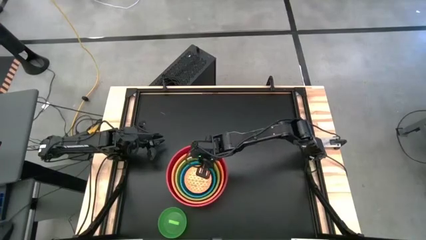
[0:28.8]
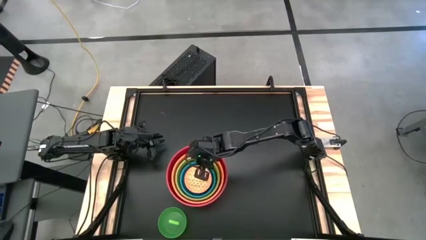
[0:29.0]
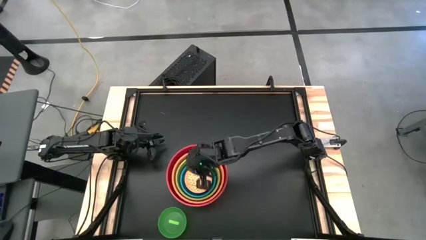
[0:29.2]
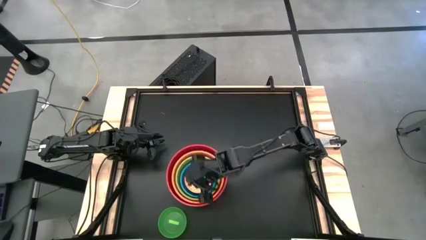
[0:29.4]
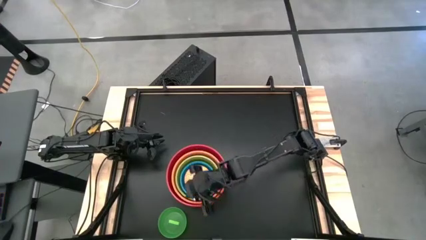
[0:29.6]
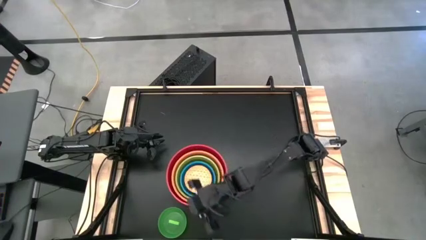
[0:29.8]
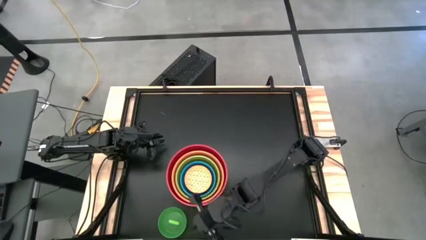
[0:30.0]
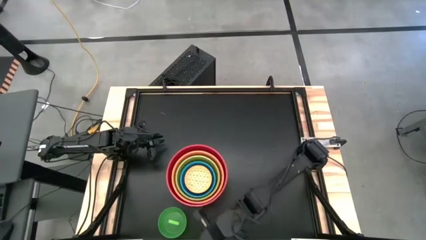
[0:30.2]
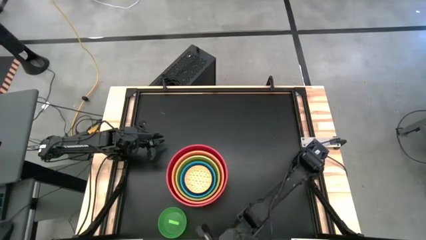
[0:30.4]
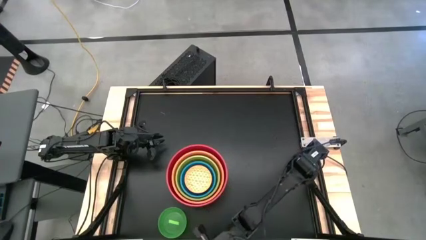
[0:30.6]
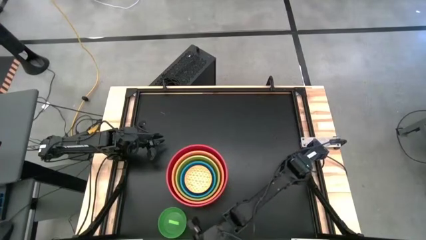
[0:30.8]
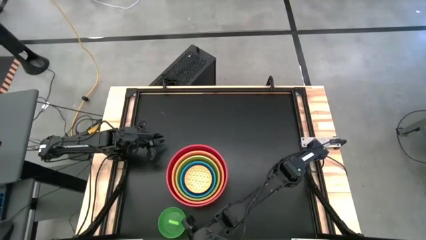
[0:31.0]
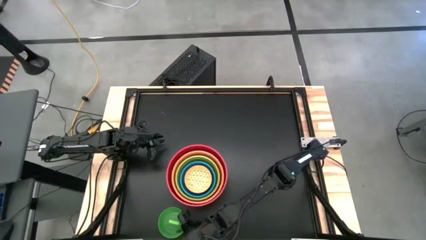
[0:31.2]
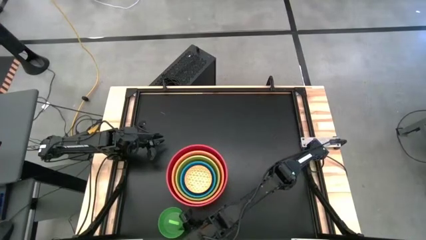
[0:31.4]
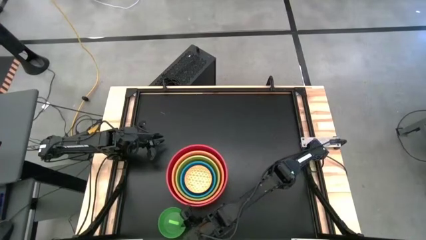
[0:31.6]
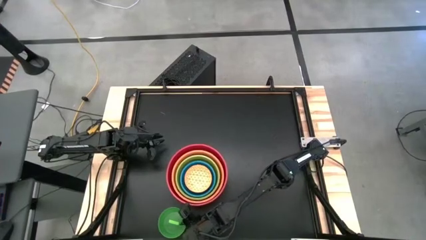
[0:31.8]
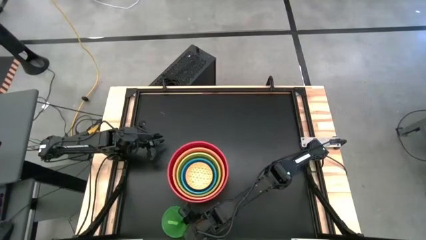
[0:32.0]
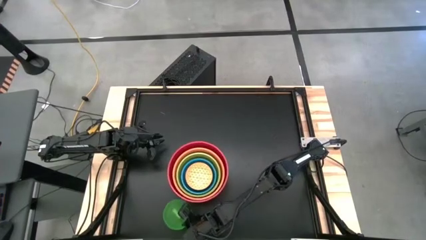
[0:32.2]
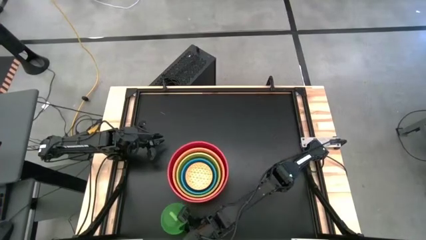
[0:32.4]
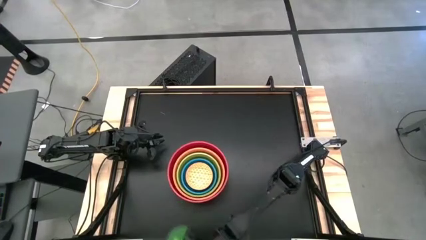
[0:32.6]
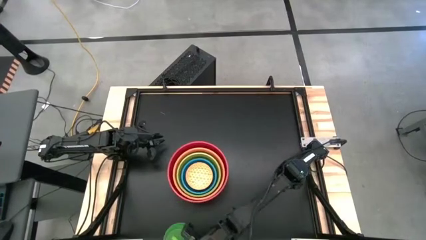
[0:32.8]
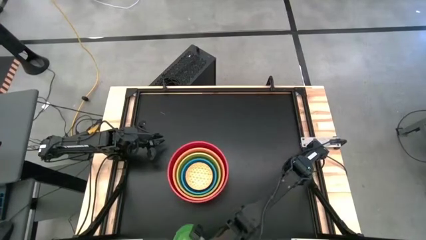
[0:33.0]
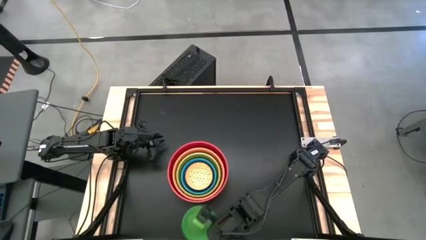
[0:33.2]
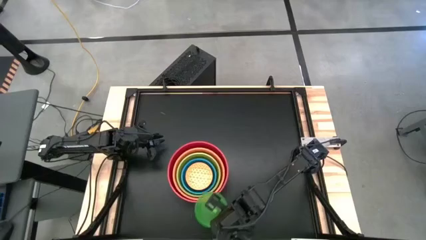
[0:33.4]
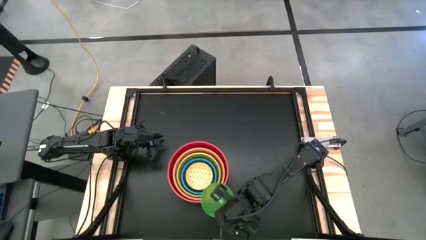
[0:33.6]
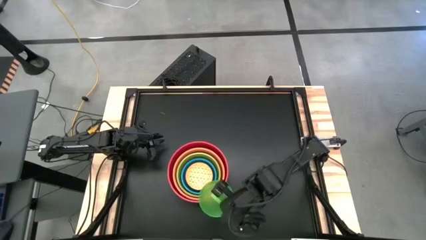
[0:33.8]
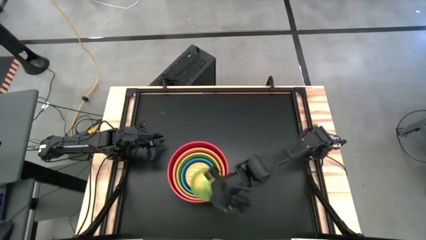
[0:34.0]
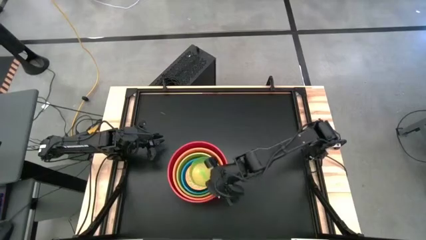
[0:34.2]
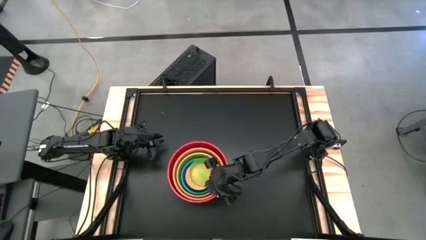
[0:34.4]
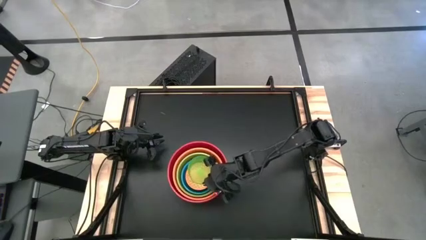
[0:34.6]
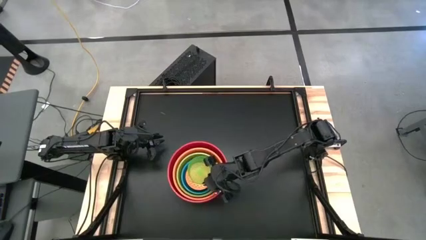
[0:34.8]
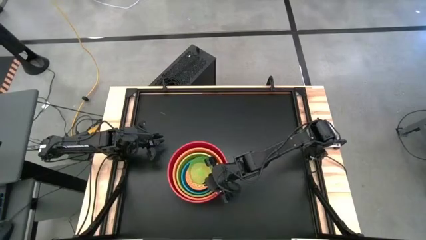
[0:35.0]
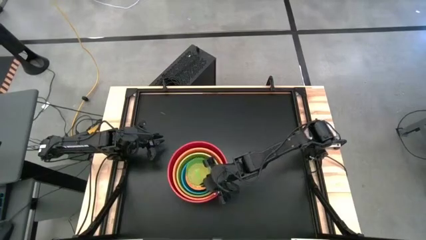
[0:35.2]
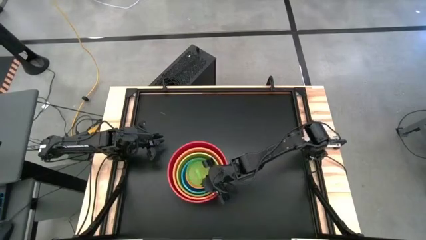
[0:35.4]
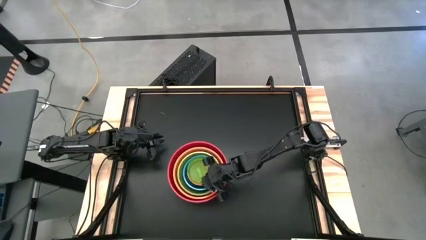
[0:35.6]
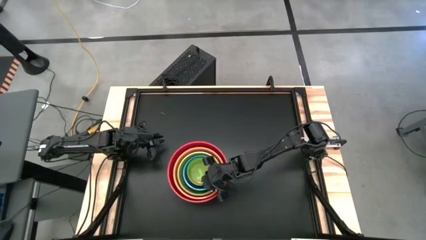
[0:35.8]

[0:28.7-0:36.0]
Stack the transparent green bowl on top of the orange patterned bowl

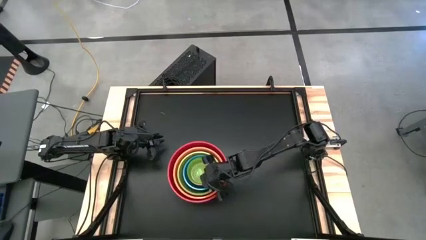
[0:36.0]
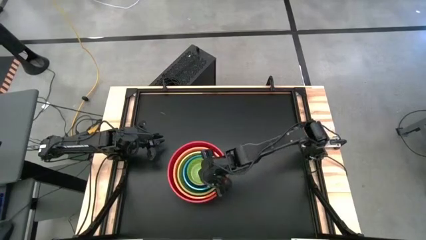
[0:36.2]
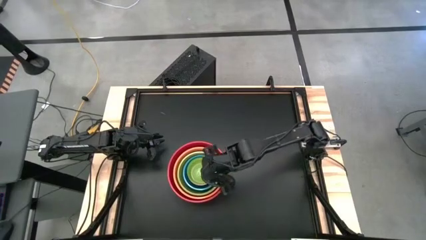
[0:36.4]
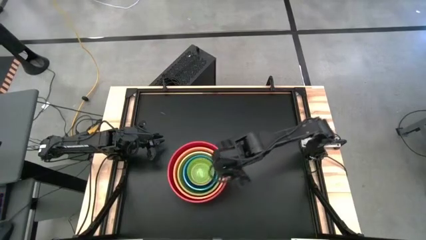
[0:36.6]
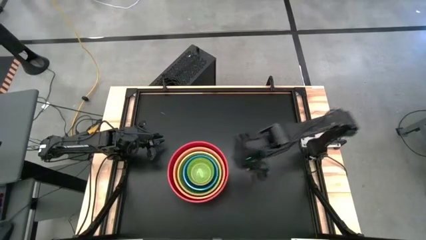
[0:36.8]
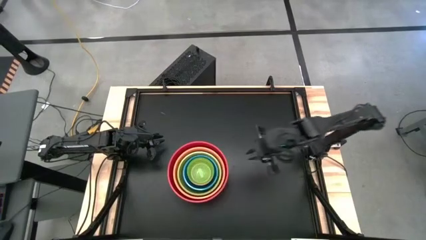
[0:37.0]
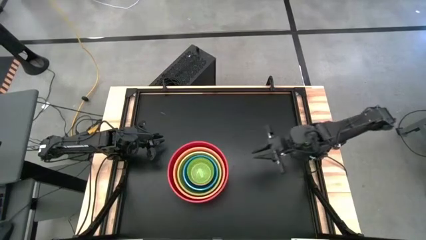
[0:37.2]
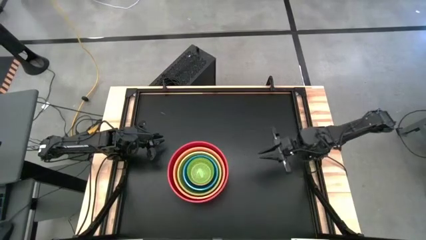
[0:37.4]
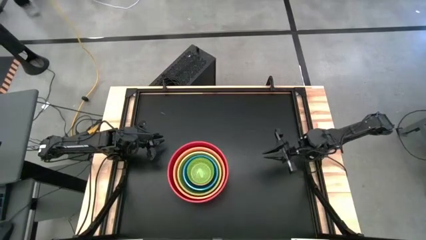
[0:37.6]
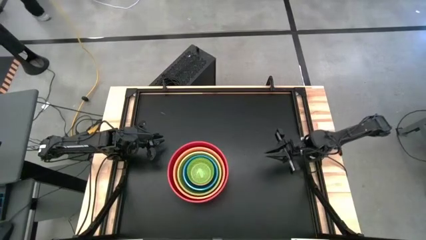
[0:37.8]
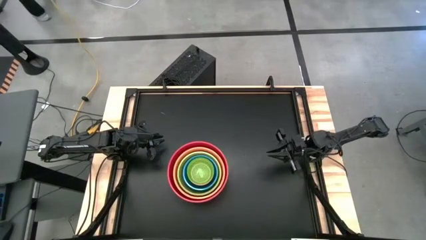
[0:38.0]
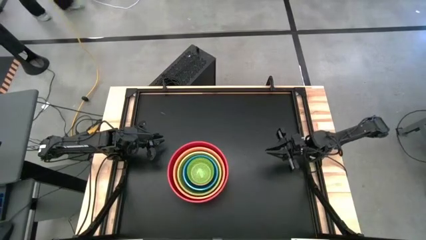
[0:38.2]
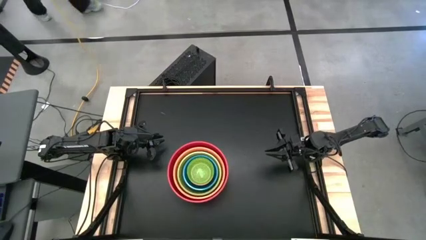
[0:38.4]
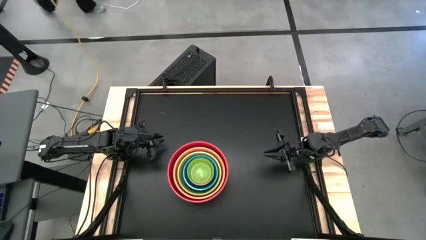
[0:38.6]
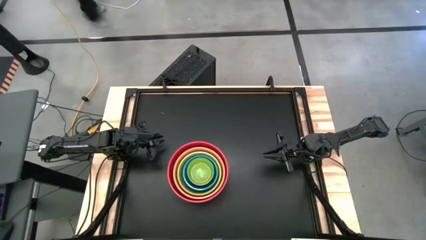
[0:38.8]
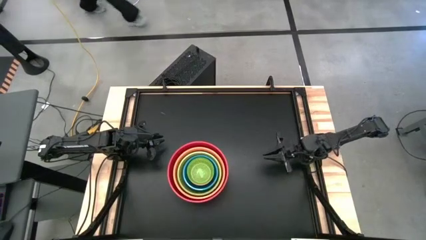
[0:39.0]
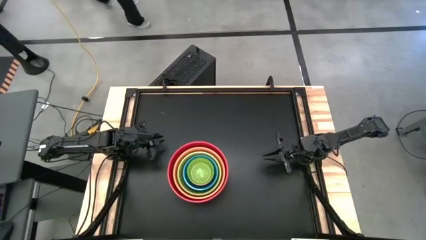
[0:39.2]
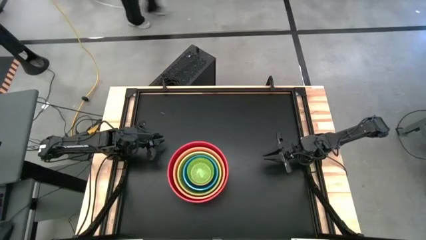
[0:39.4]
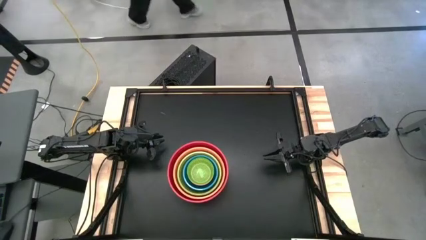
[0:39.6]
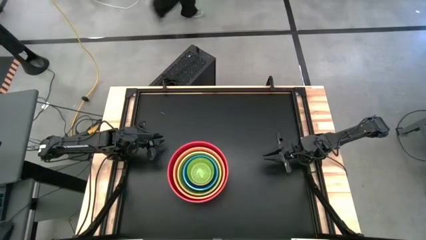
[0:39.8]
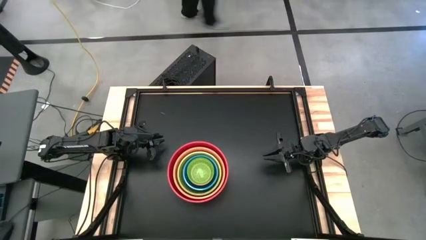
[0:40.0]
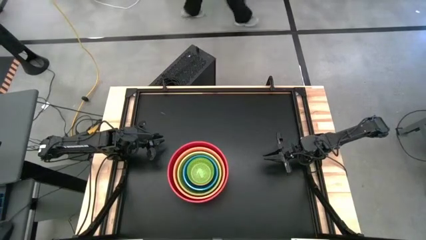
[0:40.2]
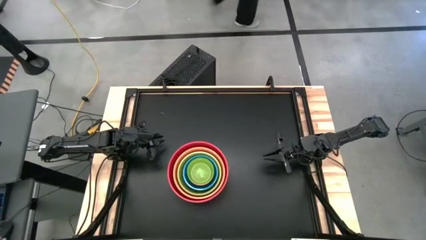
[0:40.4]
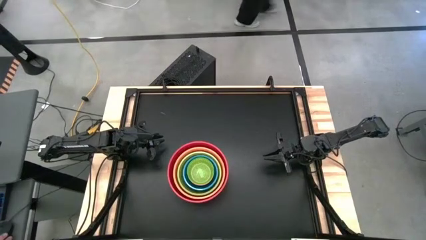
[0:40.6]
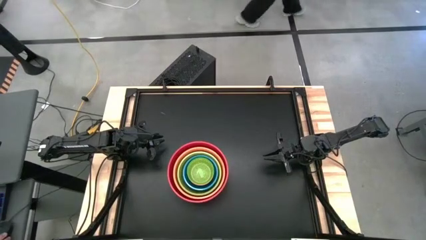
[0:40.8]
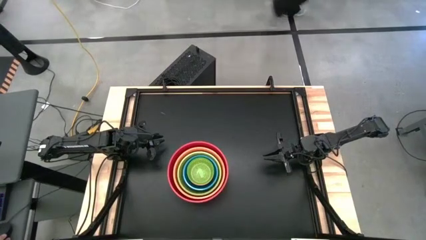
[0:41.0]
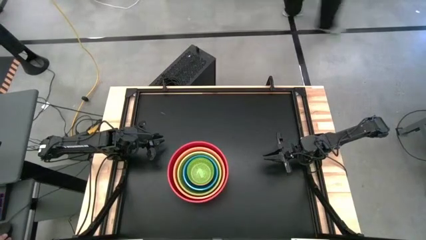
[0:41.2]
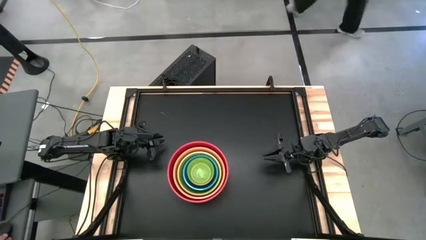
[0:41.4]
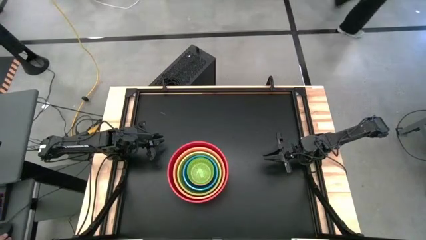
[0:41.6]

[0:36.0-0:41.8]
Return to Home Position

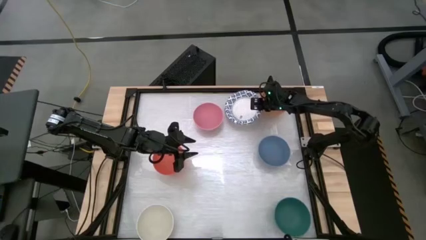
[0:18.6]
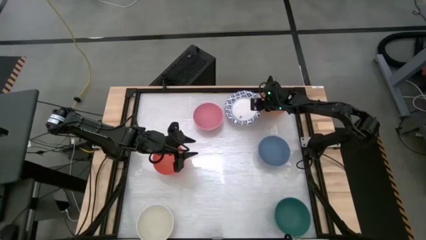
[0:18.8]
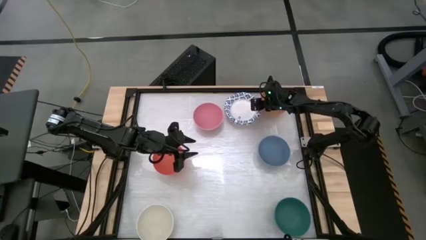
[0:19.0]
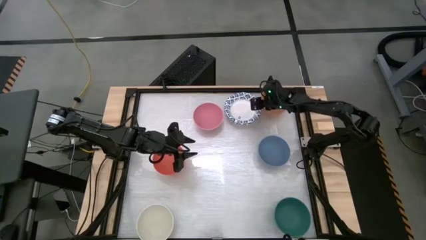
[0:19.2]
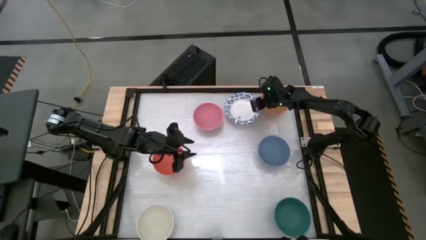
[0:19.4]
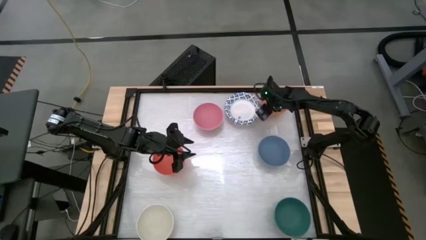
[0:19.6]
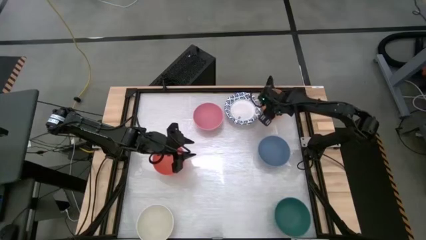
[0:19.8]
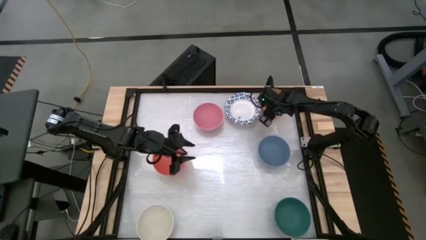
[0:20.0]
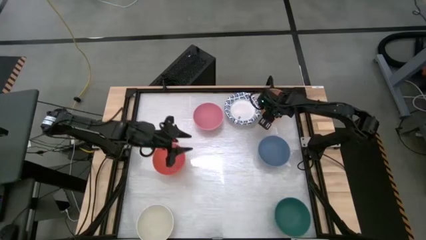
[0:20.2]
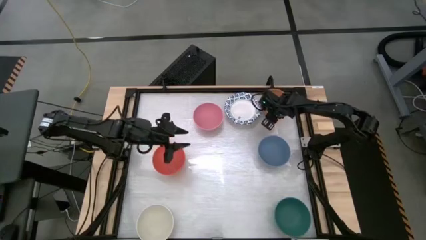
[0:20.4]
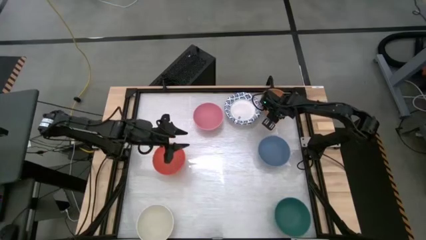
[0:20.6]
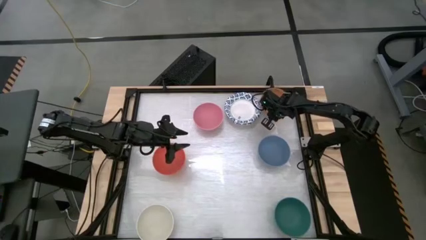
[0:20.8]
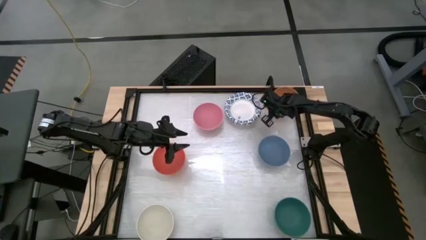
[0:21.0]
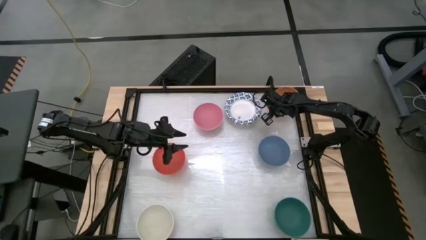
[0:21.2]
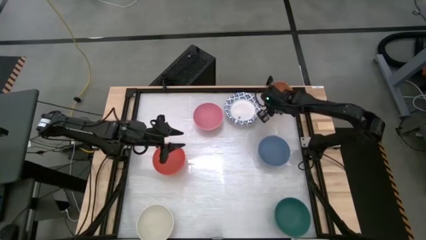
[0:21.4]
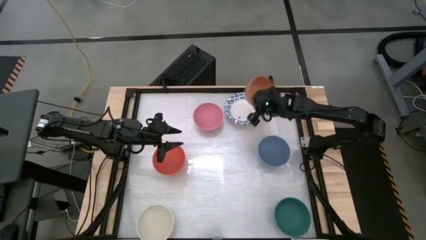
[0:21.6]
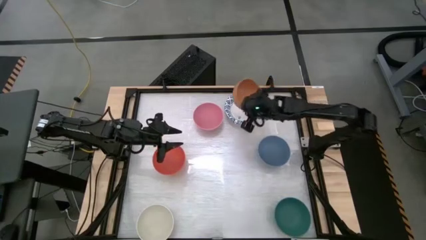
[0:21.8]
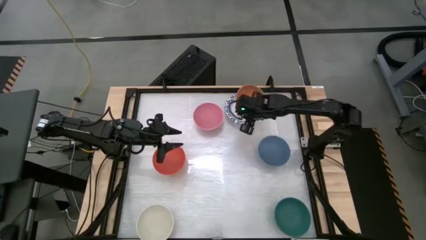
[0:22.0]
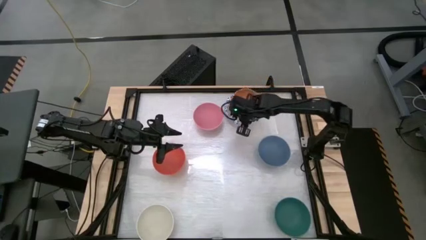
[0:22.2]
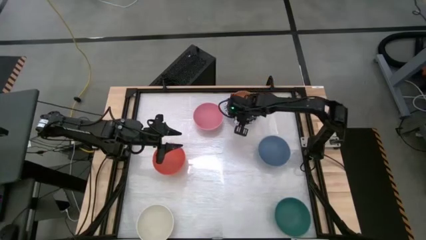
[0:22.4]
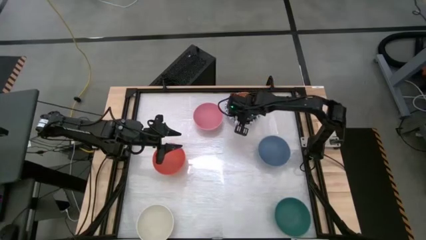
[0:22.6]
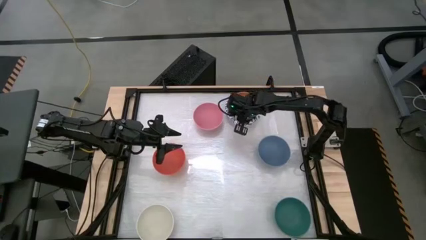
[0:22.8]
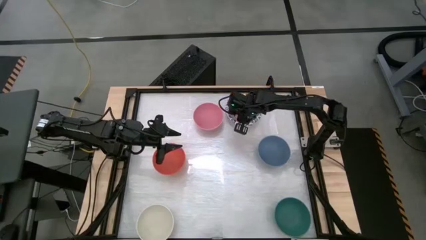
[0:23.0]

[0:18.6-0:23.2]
Stack the light orange bowl into the stacked white paper bowl
